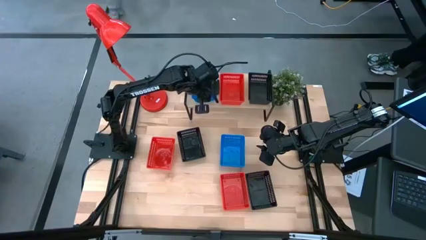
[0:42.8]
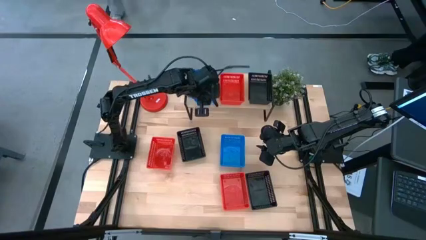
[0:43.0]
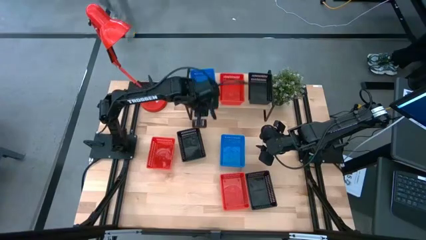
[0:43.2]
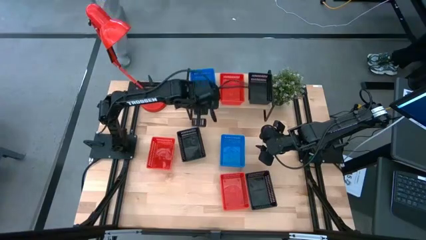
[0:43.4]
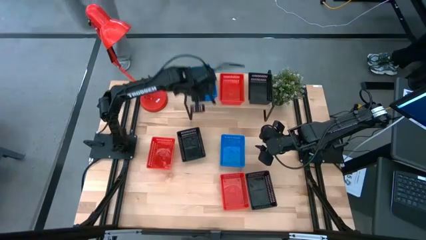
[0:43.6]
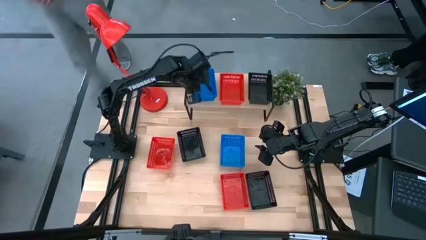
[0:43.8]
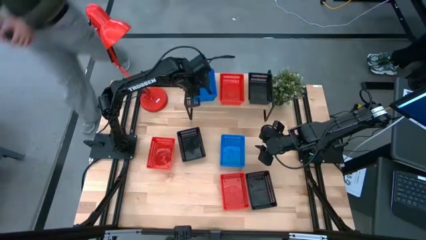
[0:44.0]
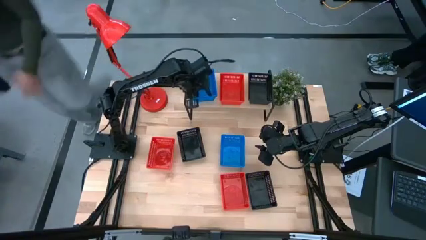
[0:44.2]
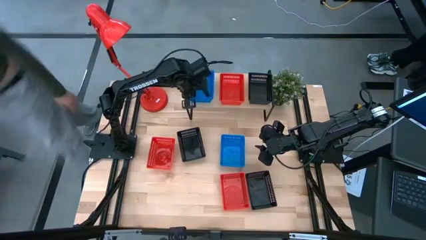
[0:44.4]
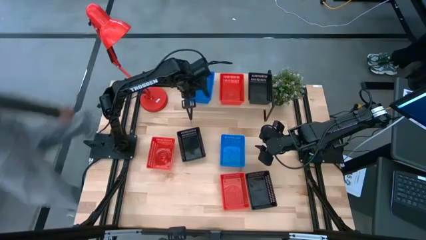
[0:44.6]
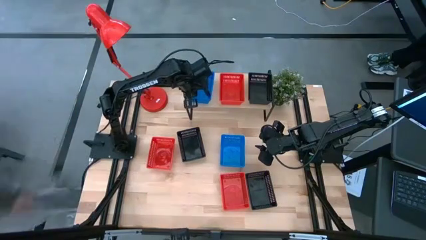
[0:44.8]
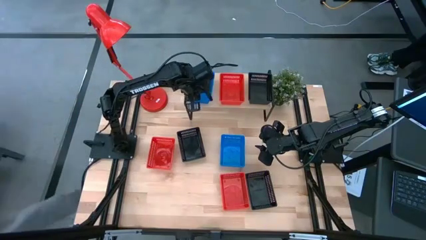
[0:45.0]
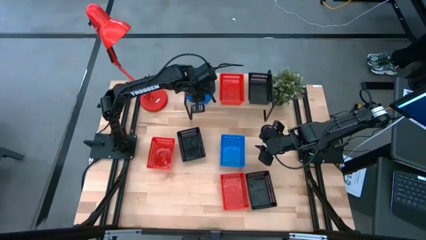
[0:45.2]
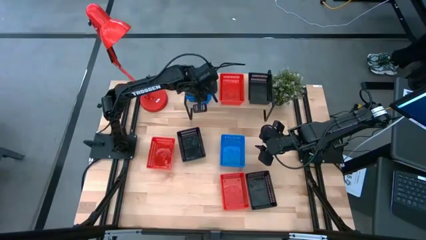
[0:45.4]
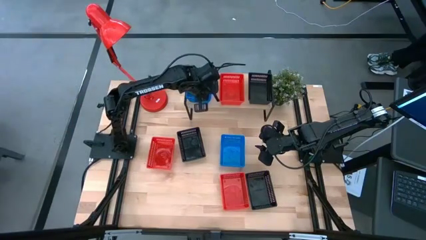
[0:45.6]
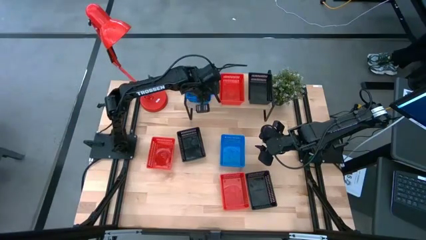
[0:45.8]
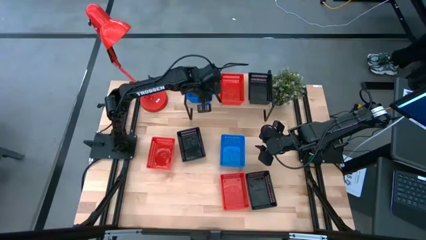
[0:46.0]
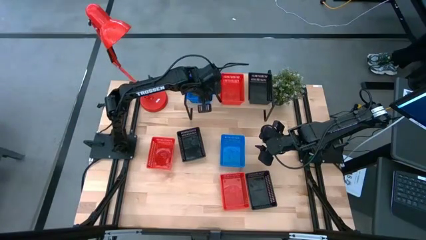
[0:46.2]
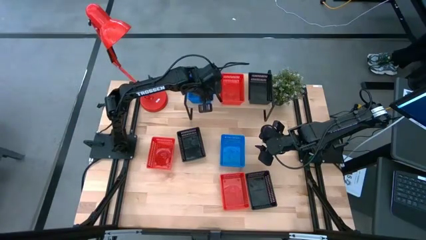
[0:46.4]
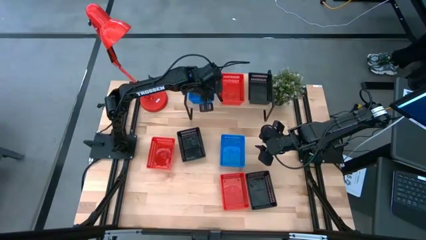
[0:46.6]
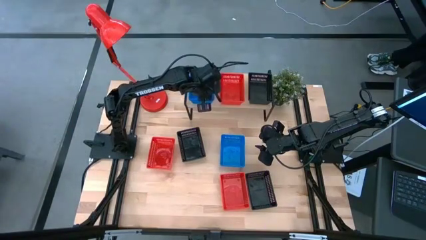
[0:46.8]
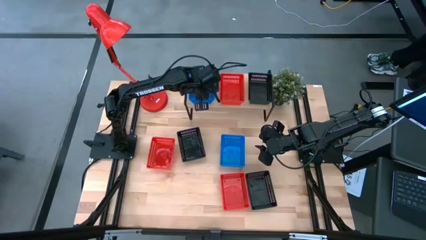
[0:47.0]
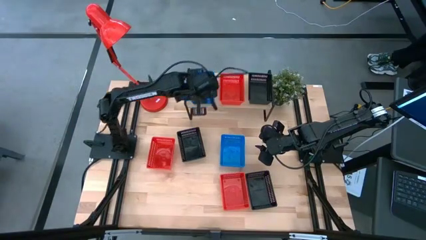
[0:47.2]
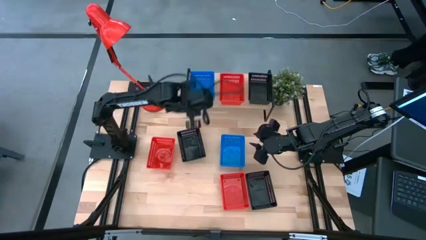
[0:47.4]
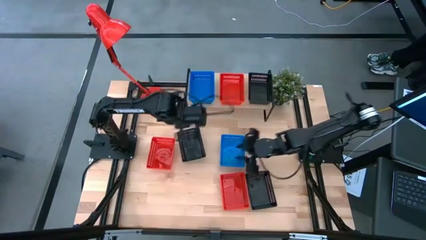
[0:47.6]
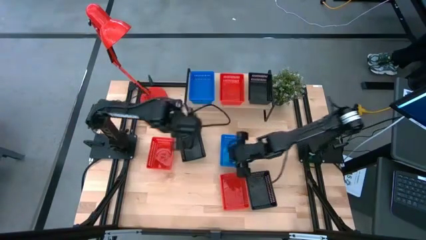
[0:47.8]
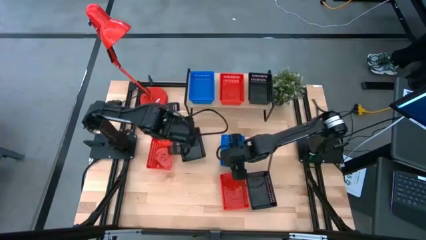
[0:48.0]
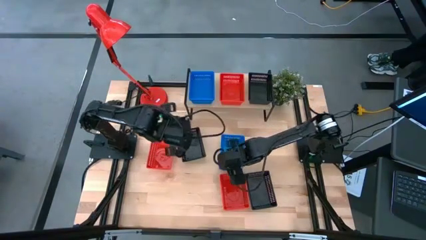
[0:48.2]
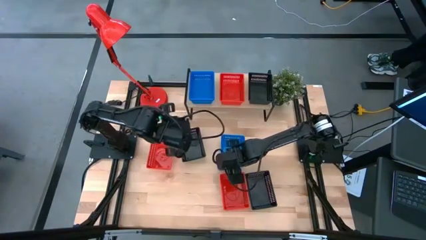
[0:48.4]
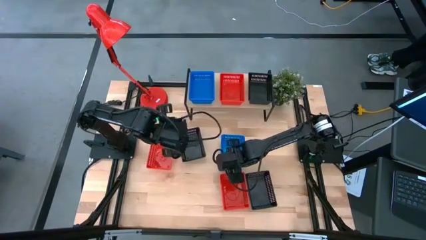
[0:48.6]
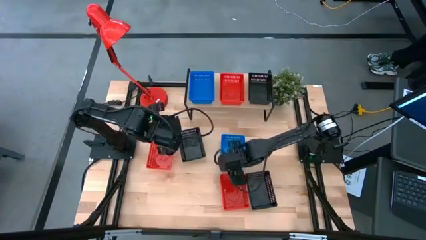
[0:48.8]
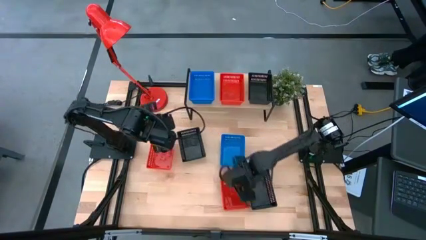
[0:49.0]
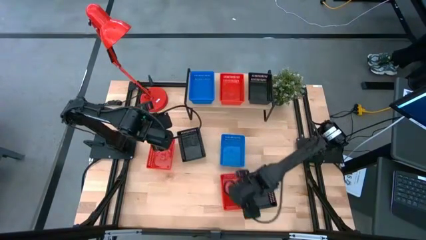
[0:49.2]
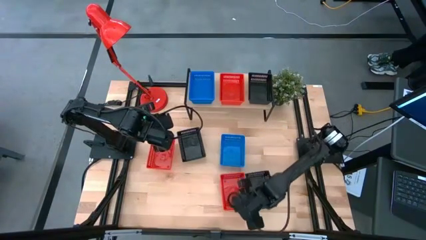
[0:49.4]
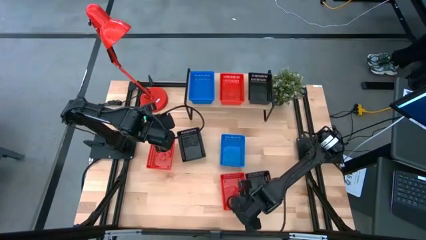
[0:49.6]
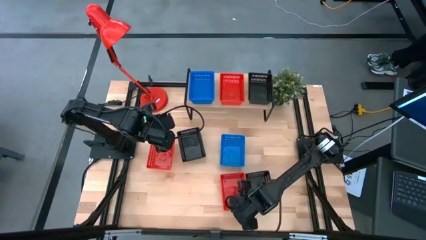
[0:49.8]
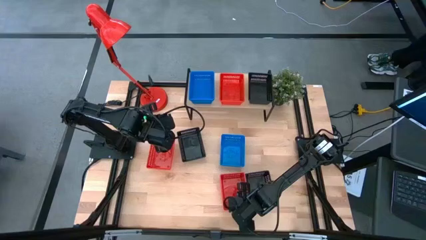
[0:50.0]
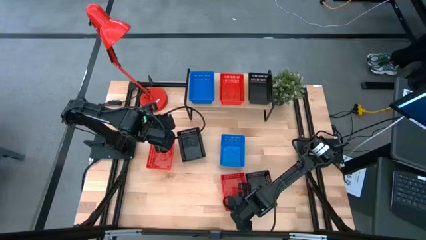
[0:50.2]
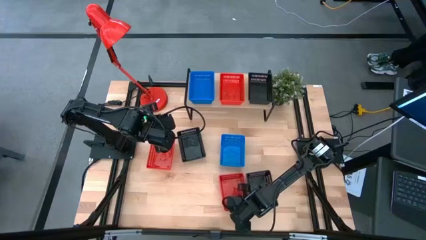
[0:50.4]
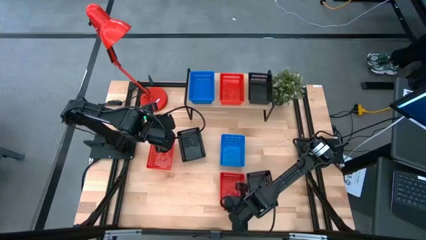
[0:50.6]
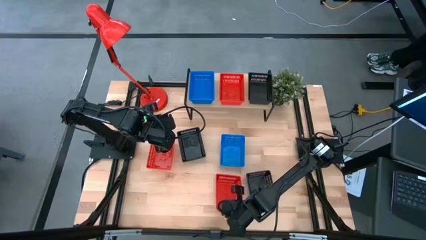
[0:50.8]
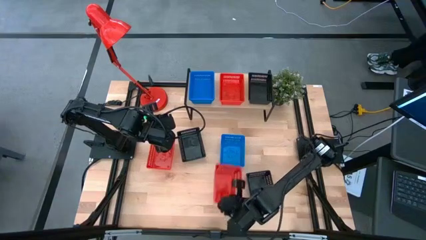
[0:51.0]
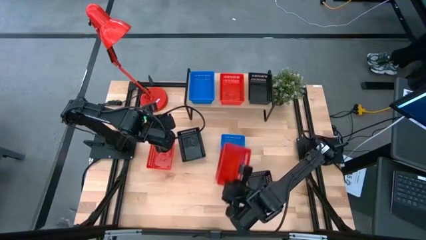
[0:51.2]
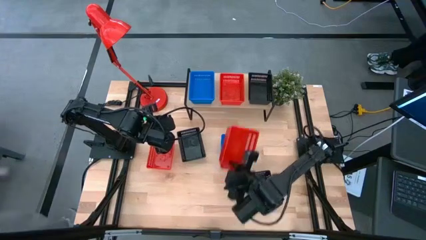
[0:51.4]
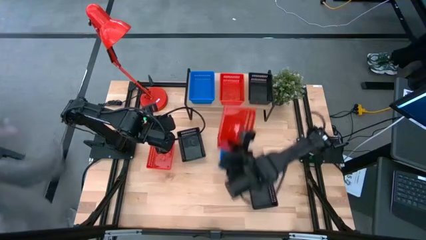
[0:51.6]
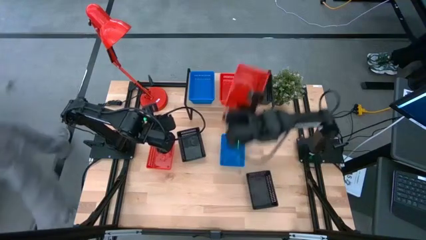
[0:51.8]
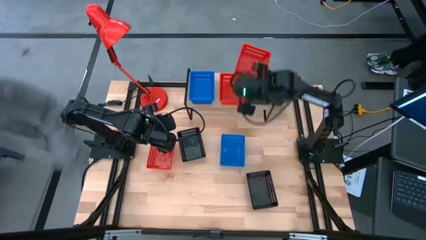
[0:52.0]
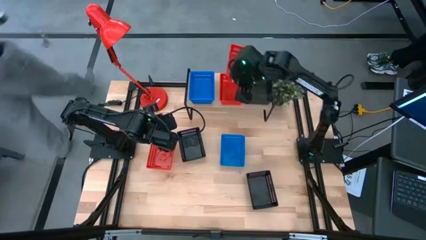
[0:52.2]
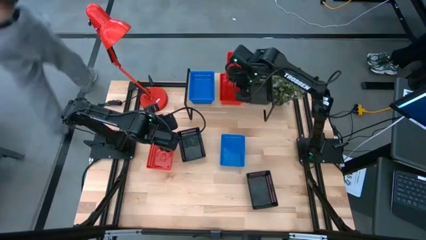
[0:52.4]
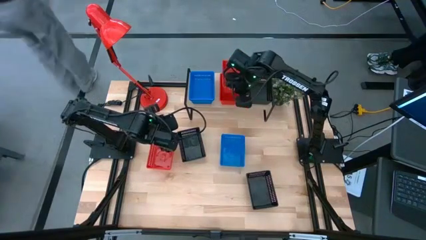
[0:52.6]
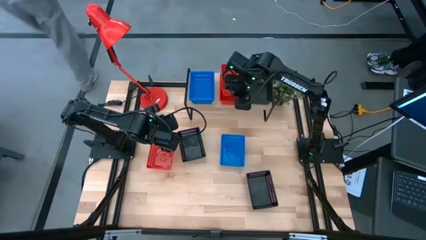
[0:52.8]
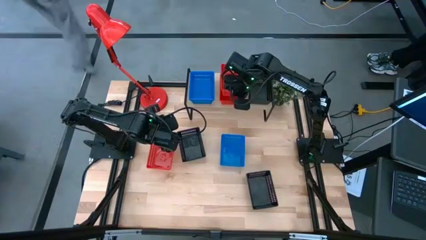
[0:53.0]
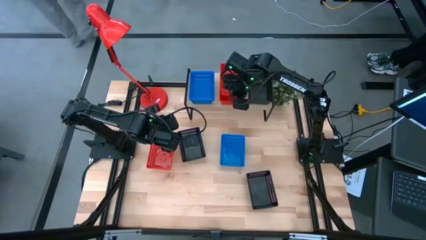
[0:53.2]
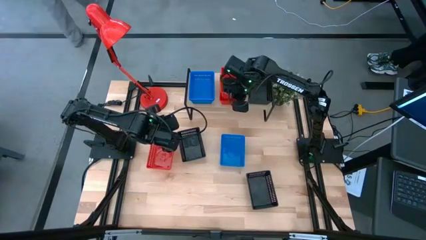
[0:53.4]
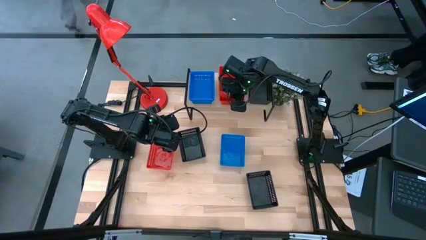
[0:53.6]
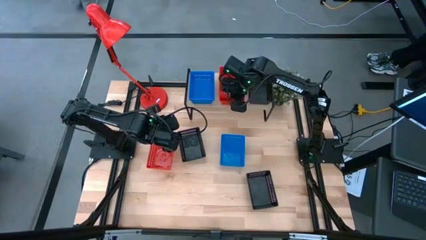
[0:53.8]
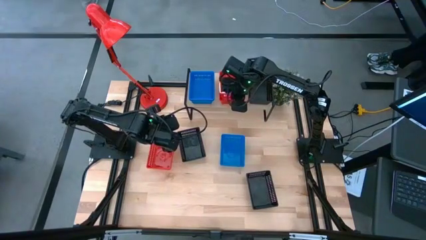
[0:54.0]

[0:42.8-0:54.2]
Task: Stack baskets on shelf by color
Stack the right red bin on top of the red bin on the shelf

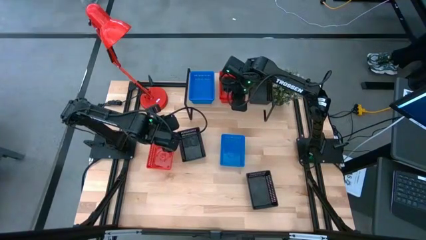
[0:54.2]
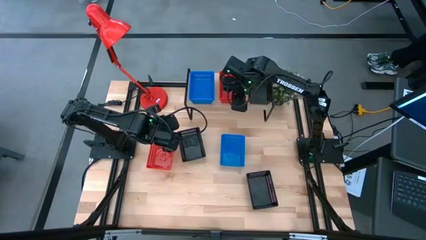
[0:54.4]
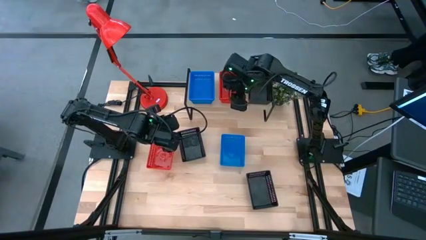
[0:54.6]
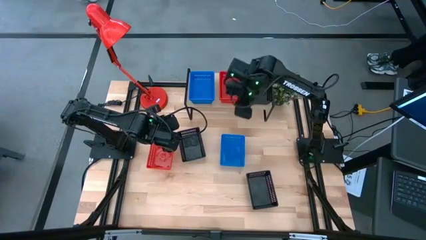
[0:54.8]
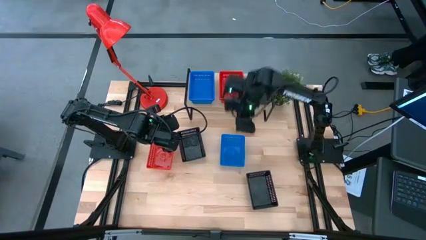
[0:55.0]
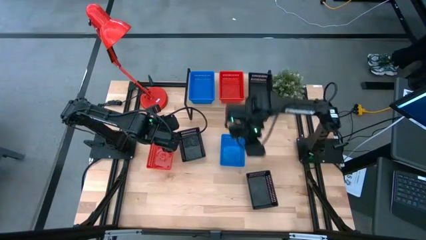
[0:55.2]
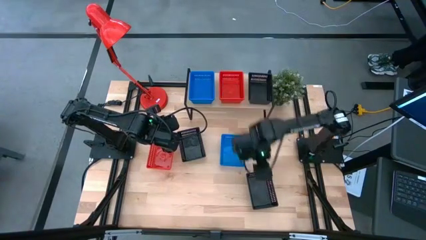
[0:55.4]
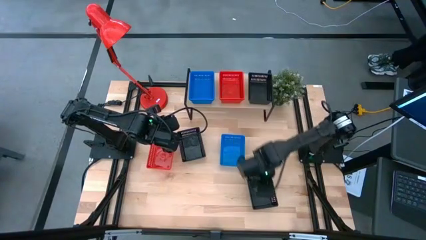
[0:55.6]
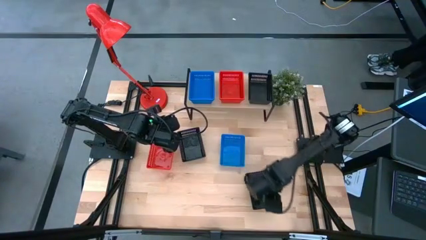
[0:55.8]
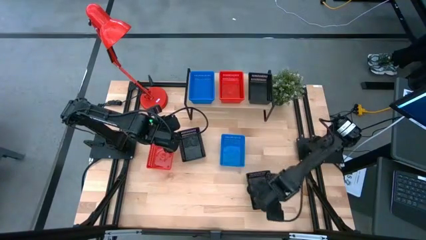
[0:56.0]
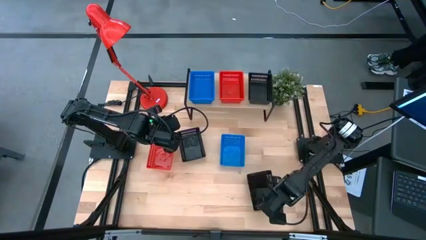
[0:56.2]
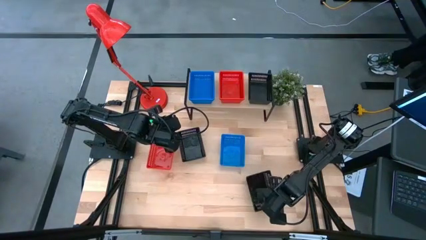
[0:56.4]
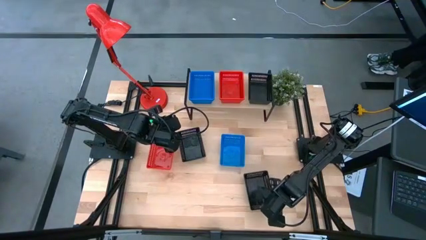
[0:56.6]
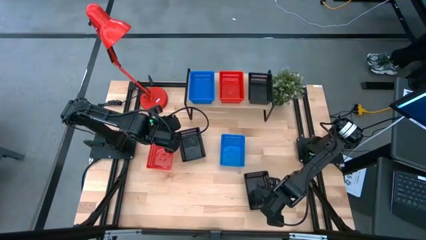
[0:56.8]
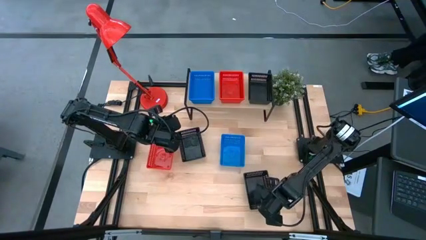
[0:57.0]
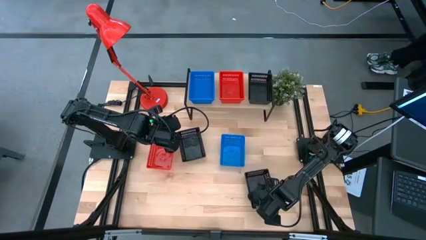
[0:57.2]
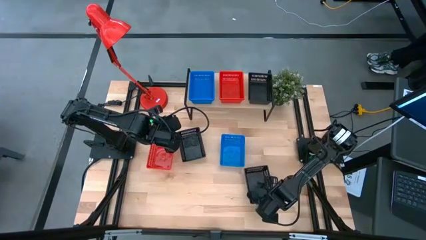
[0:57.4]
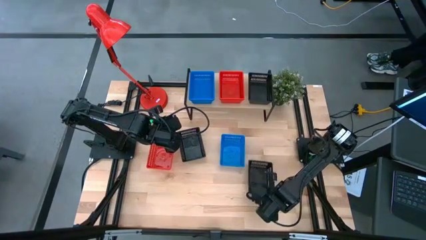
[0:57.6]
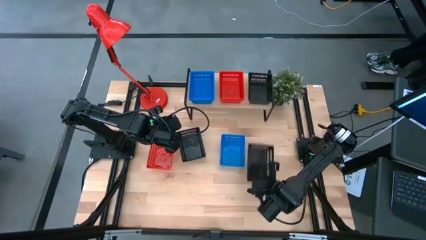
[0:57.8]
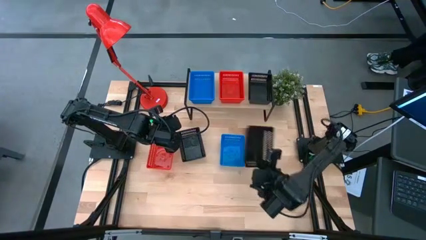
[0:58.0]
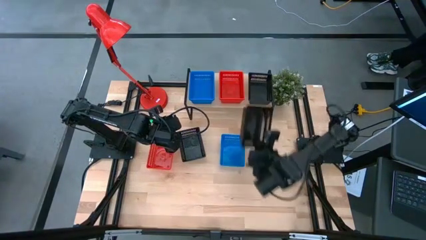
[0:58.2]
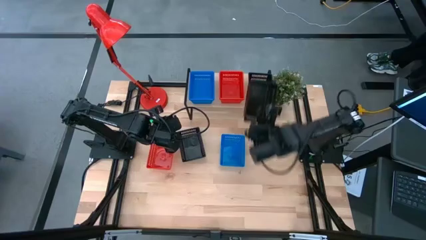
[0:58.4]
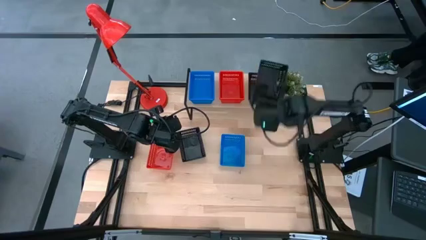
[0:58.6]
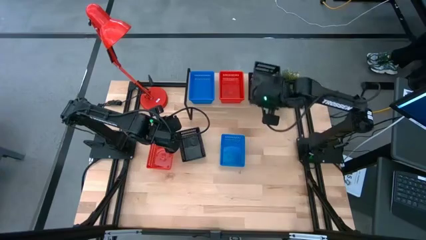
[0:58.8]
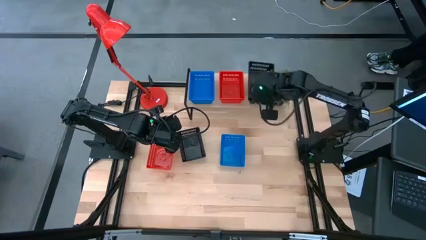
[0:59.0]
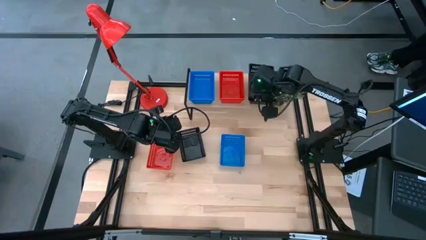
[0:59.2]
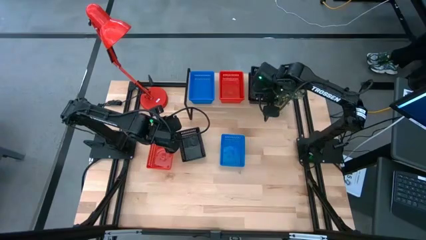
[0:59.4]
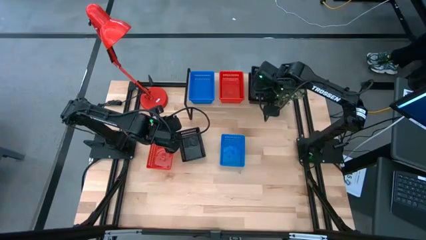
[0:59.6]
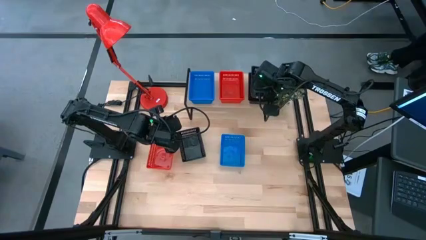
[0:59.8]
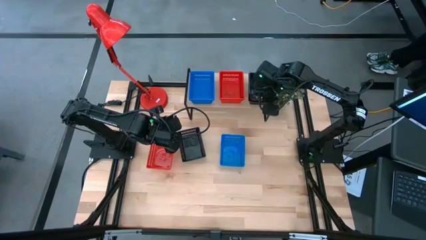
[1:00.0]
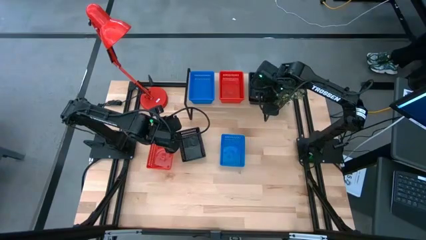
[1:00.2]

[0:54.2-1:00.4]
Stack the right black bin on top of the black bin on the shelf
